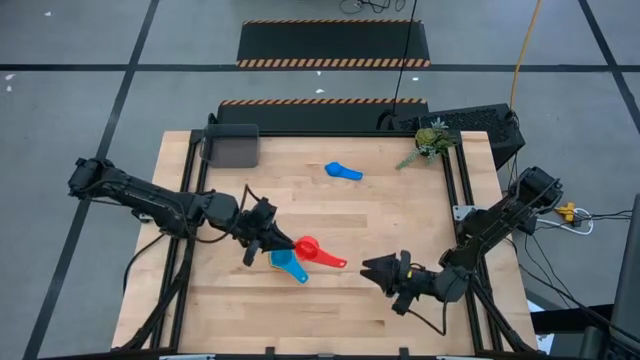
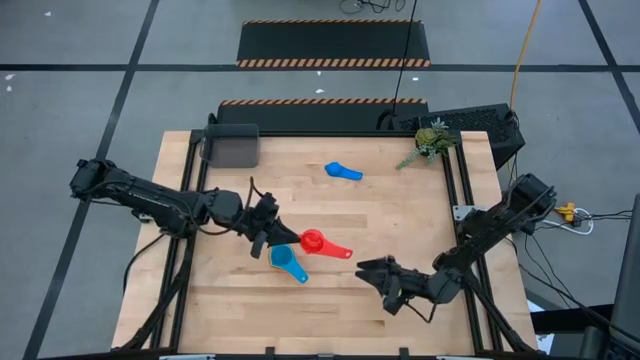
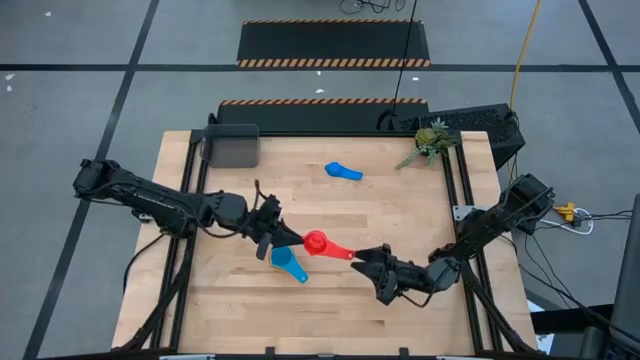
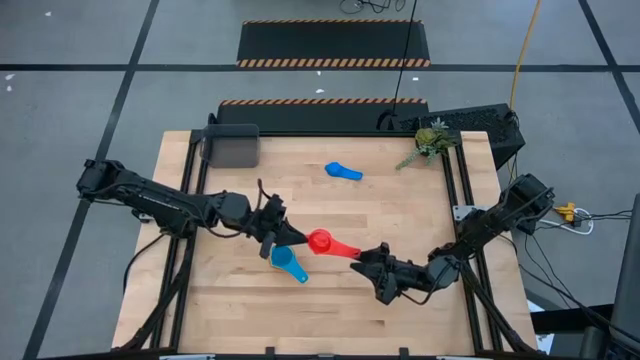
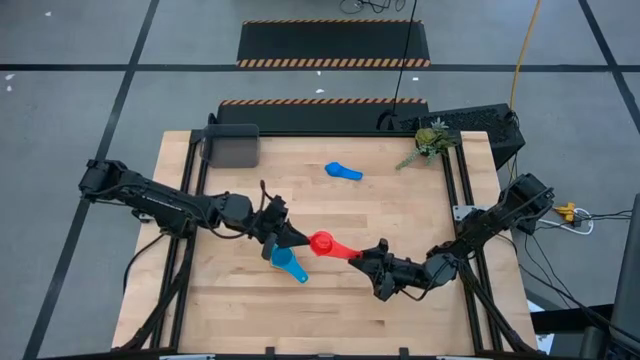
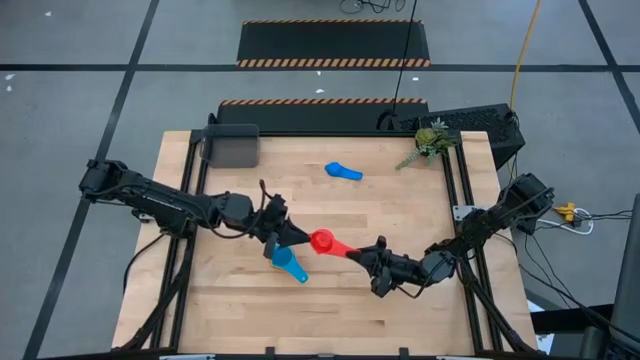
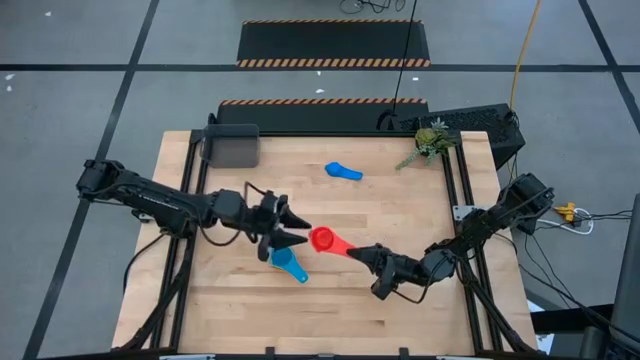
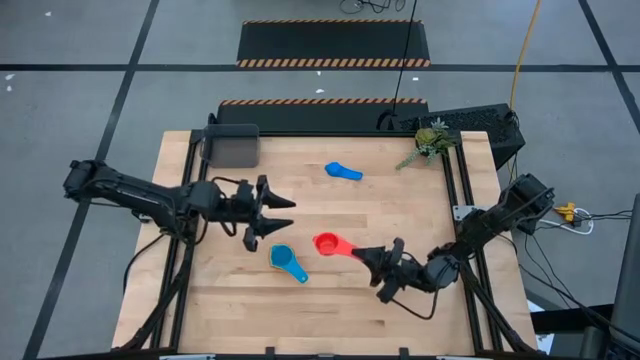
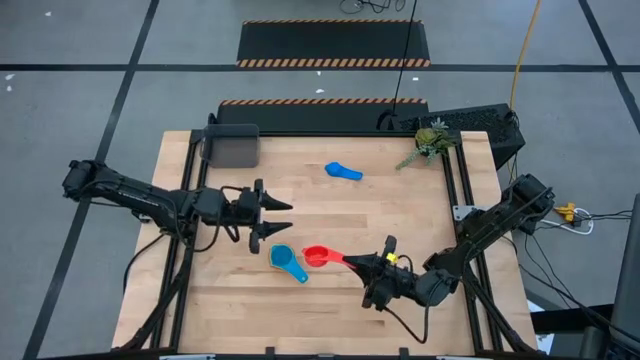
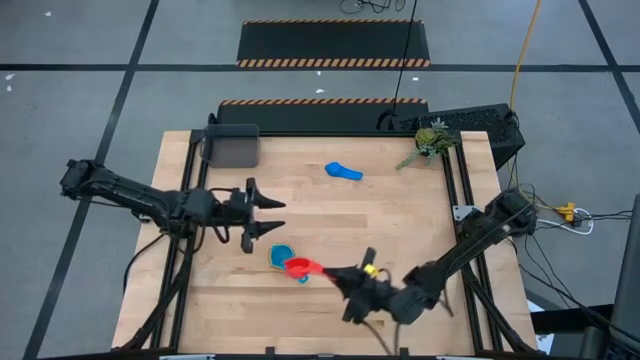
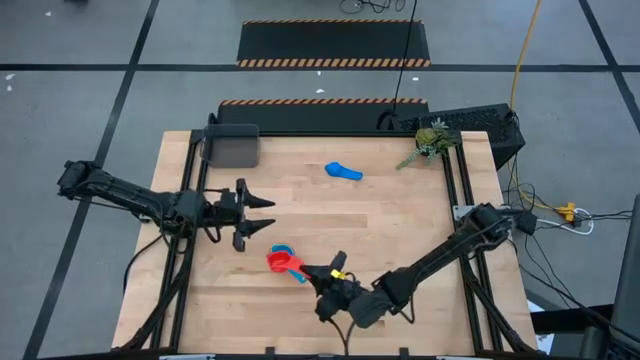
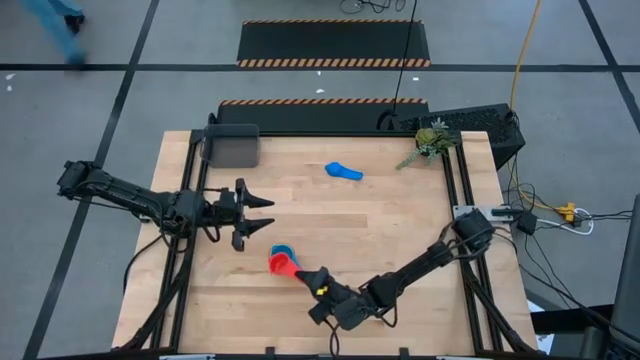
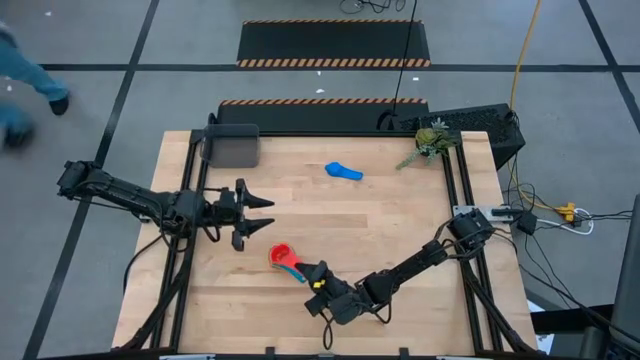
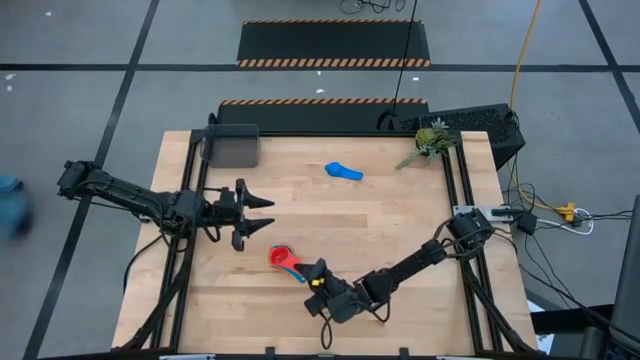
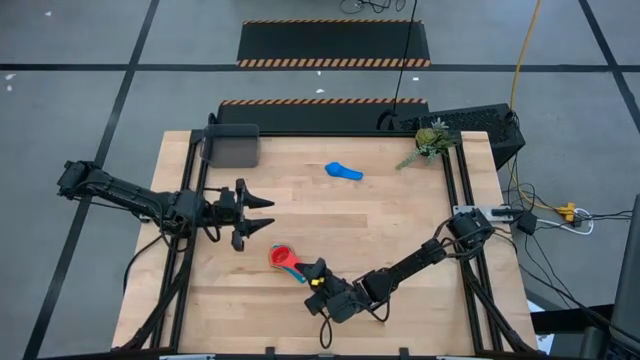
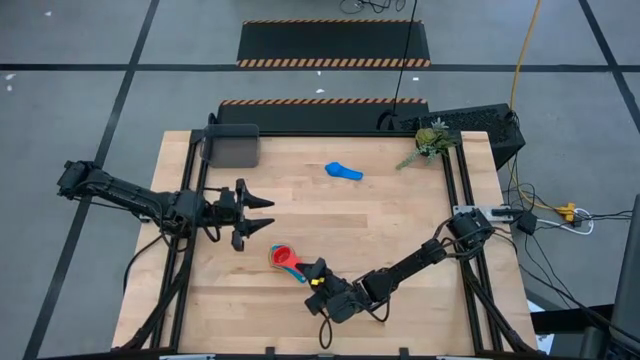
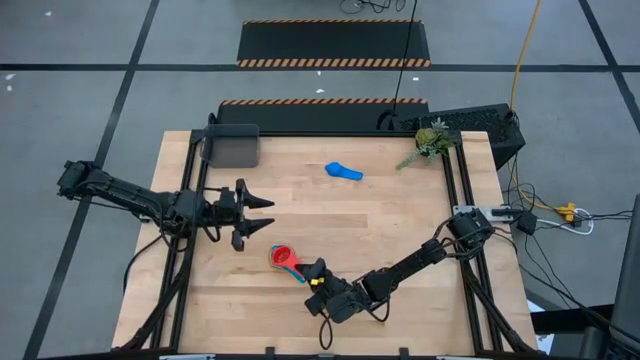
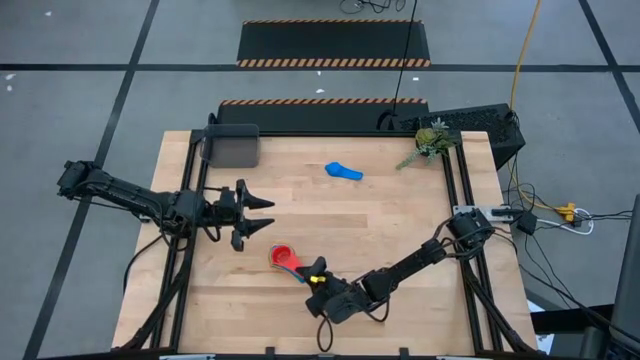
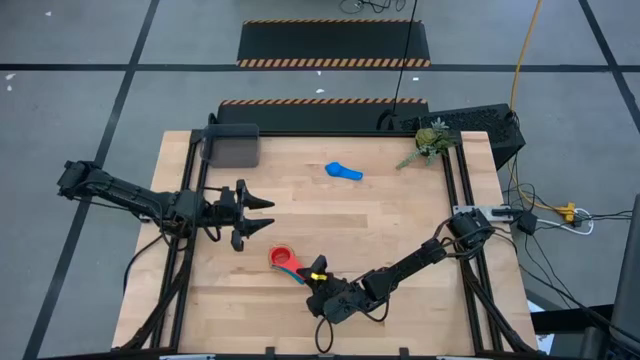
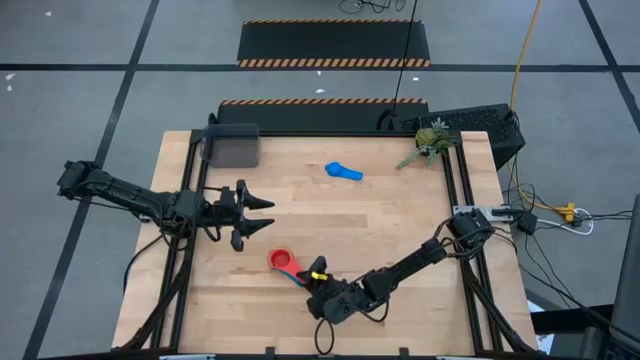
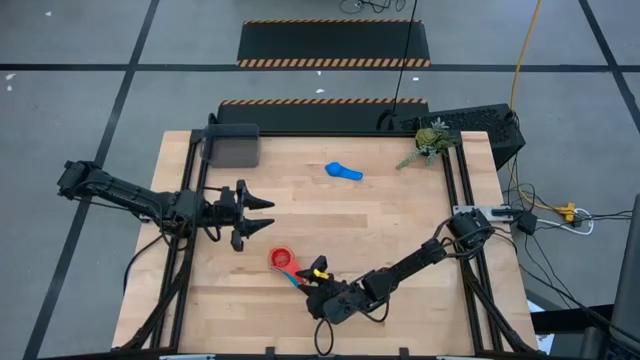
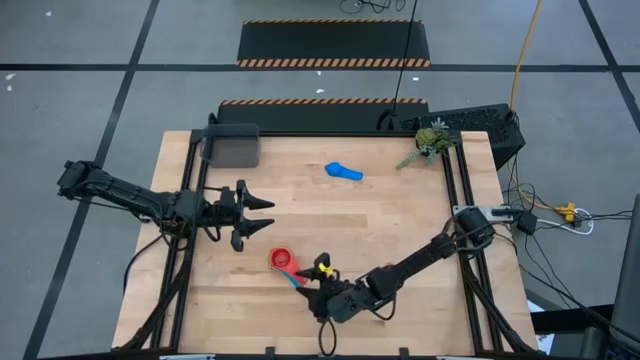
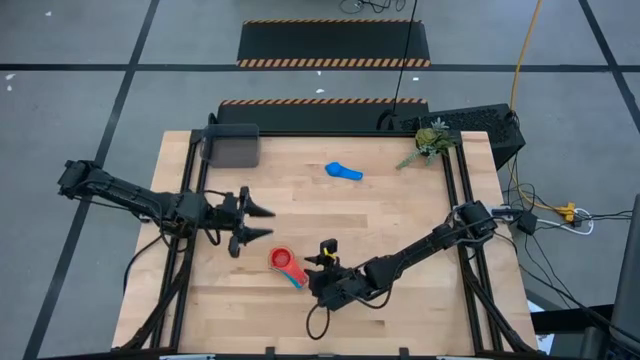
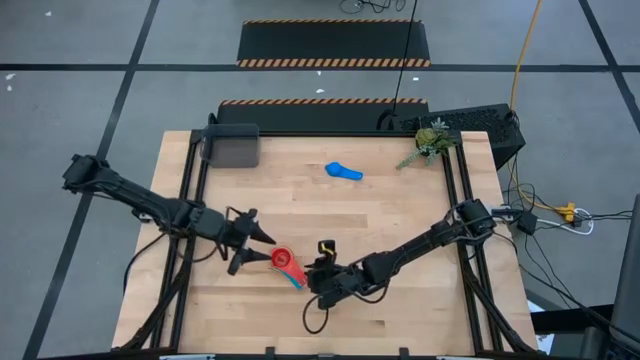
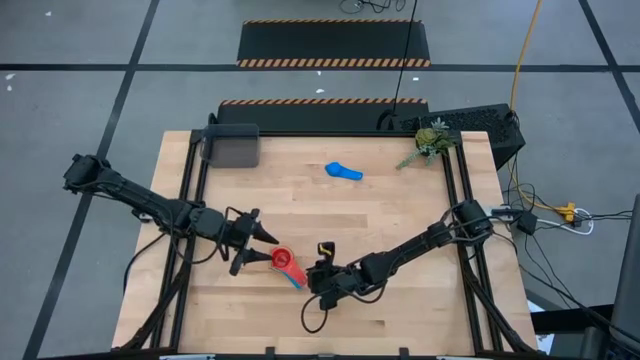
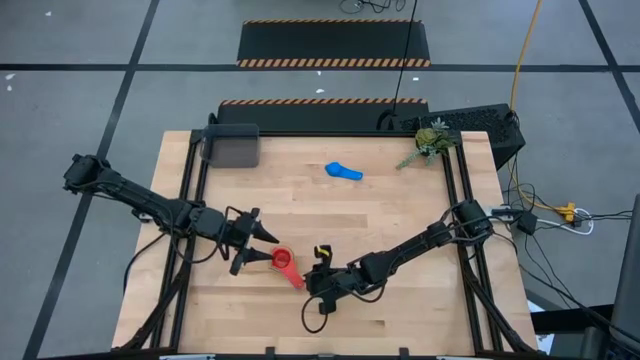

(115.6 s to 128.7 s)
Task: Nest measuring cups in basket
Stack the red measuring cup on top of the light blue measuring cup

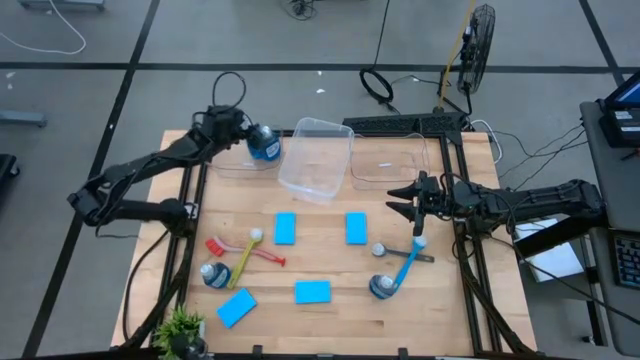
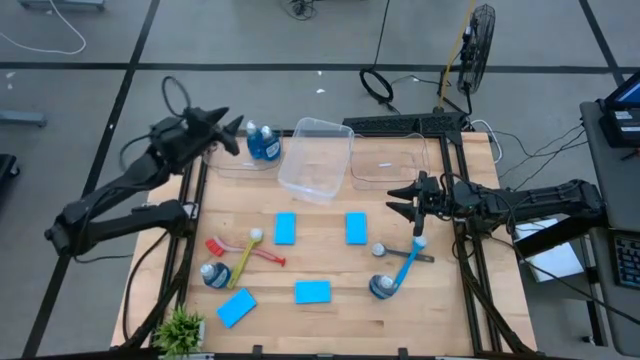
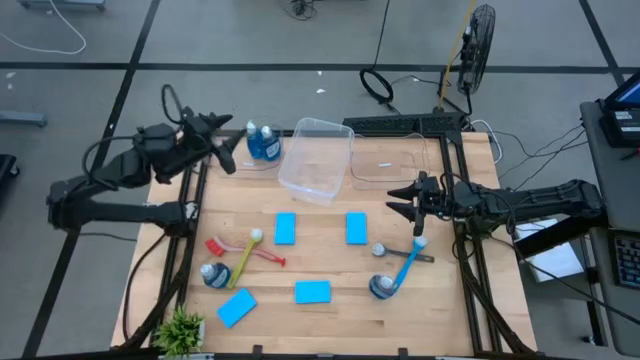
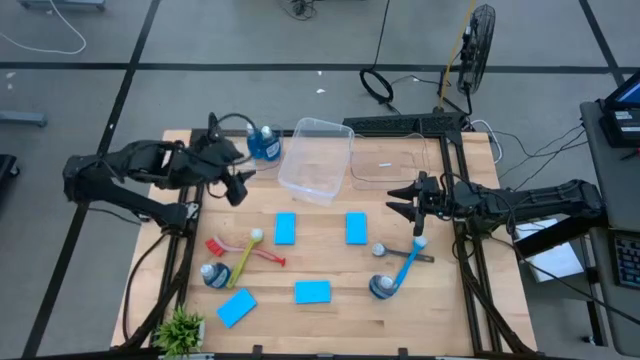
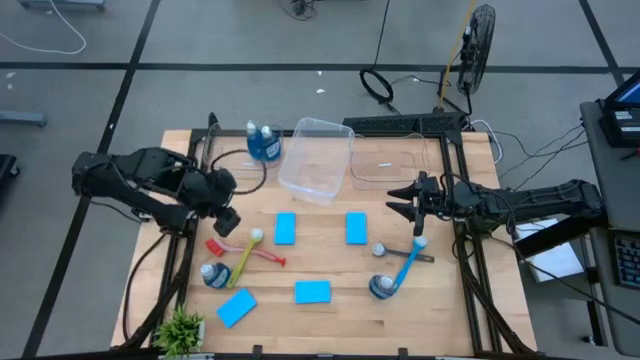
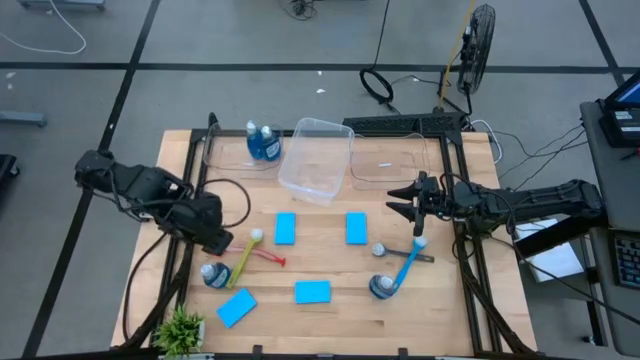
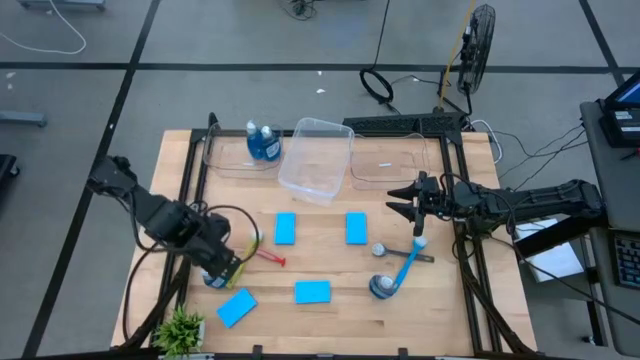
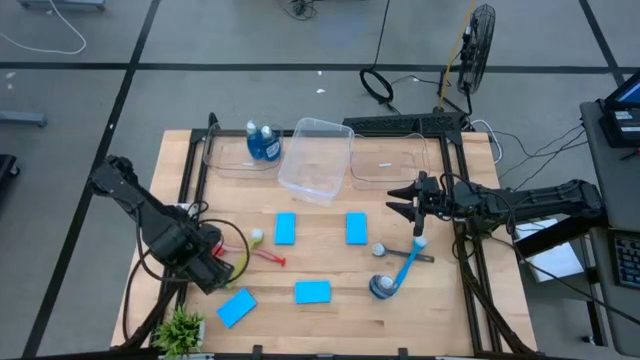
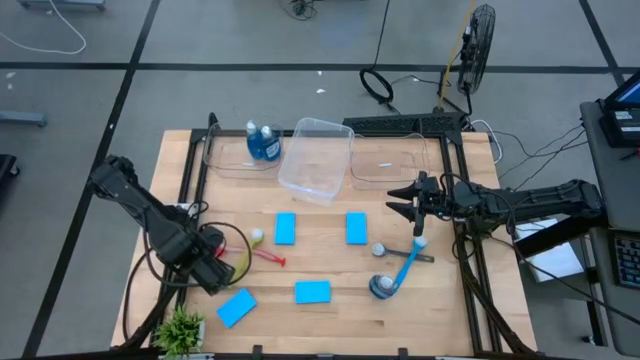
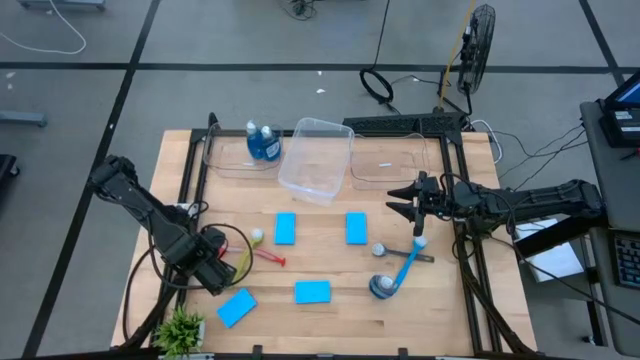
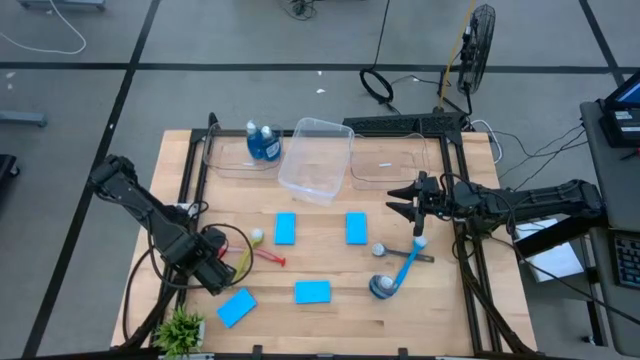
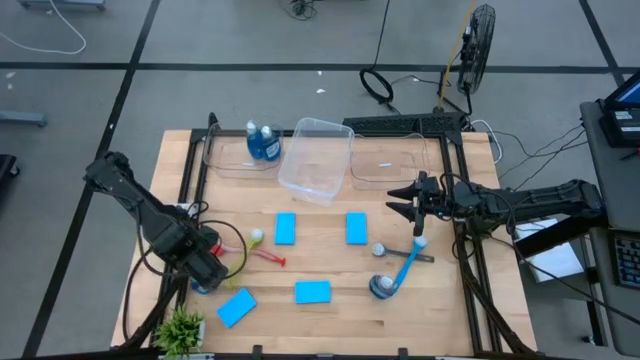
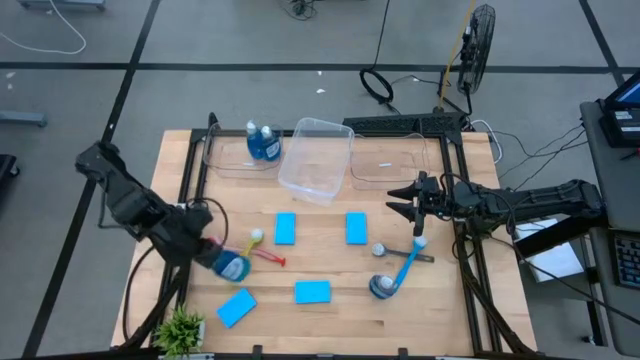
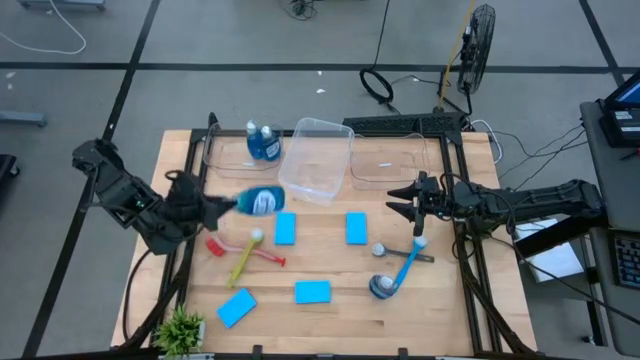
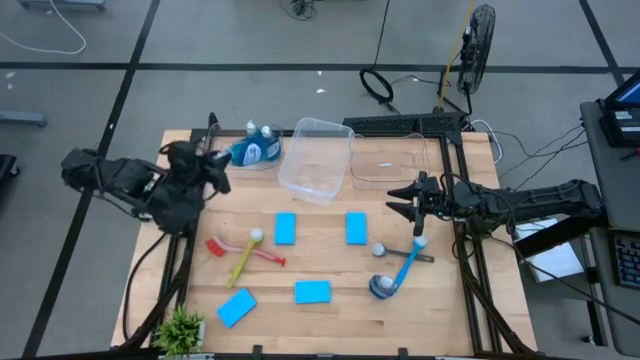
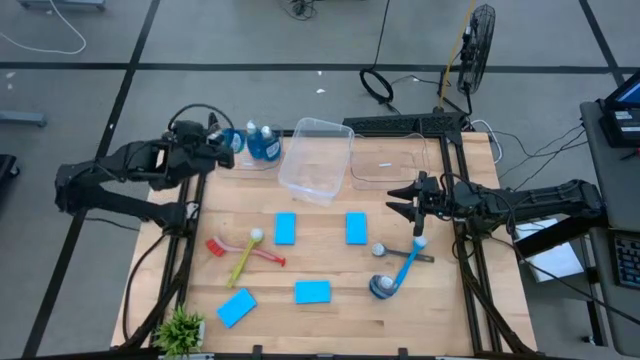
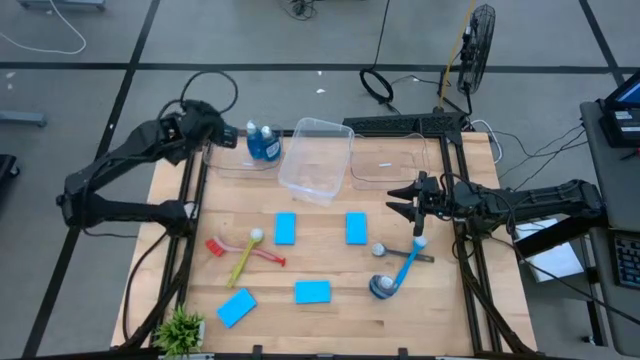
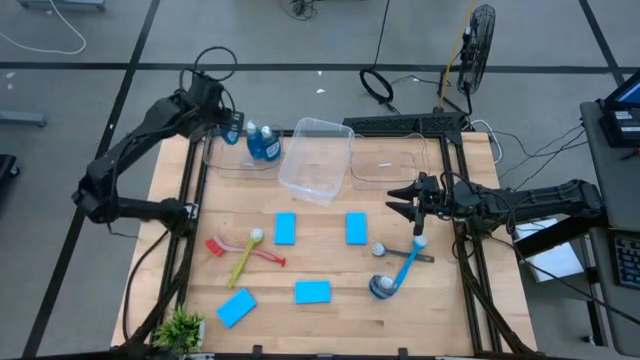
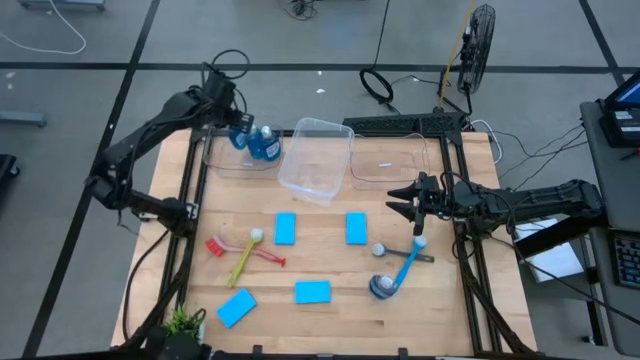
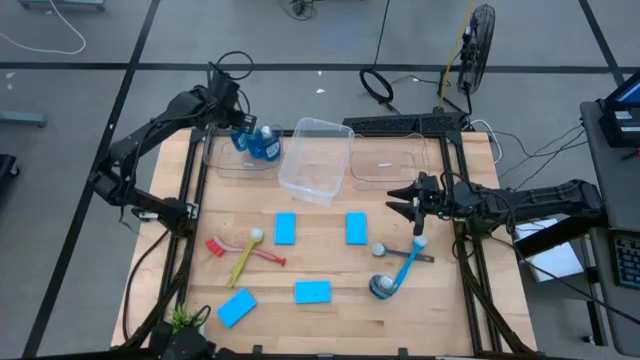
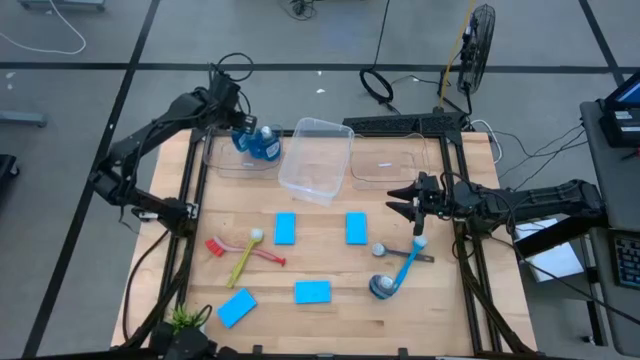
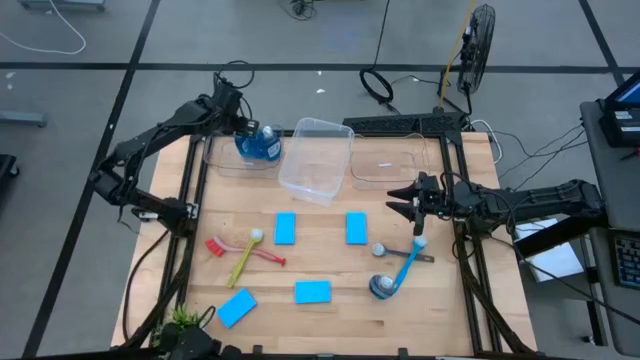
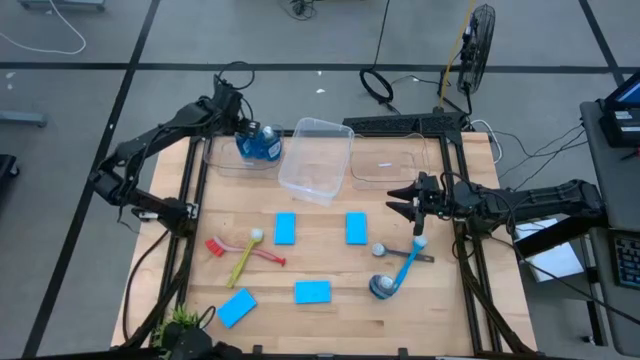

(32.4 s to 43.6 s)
Task: Pick & Place Kitchen Sink Supplies
Put the blue dishwashing liquid into the left transparent bin
